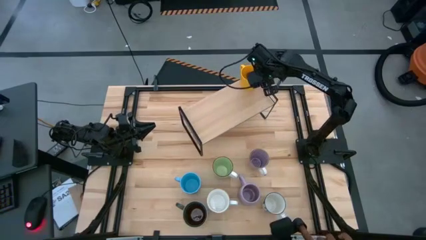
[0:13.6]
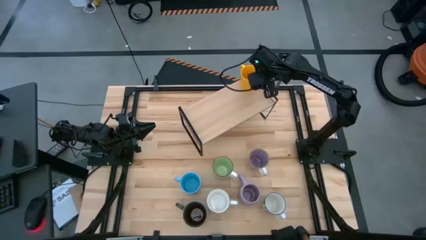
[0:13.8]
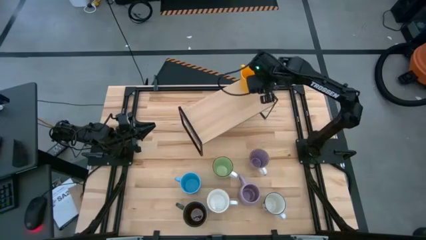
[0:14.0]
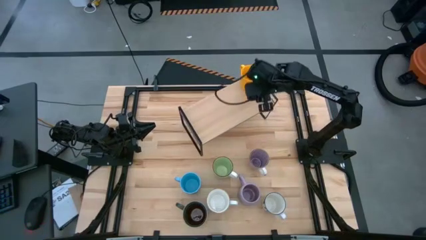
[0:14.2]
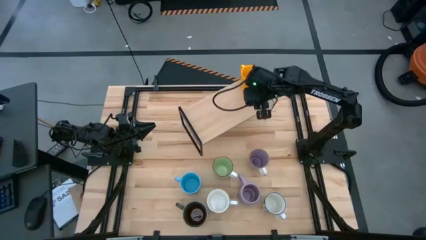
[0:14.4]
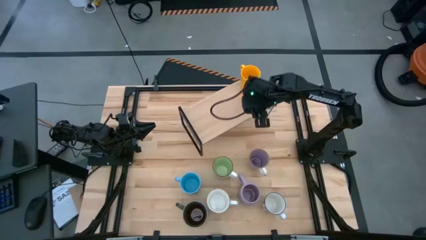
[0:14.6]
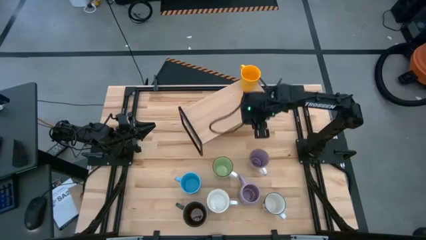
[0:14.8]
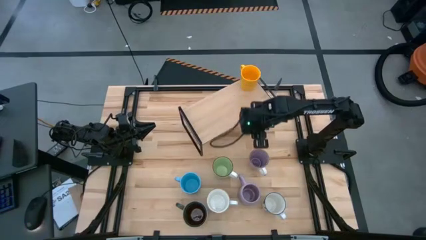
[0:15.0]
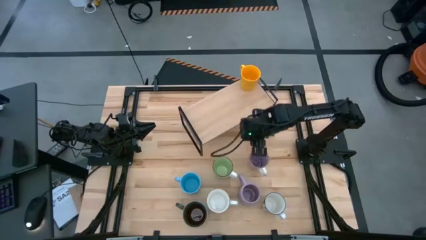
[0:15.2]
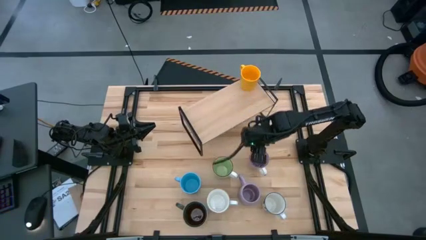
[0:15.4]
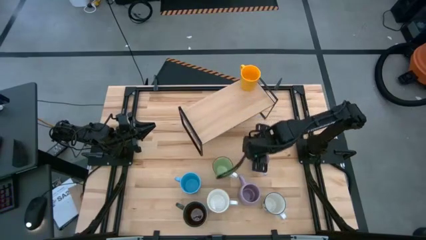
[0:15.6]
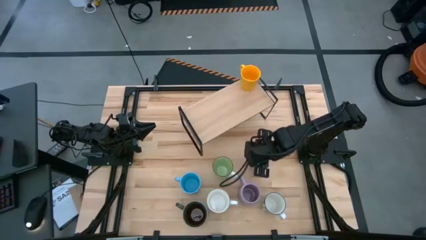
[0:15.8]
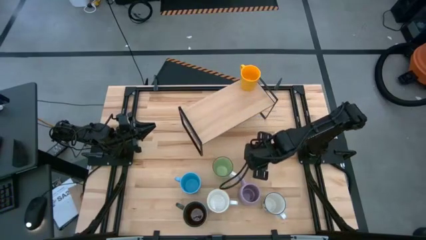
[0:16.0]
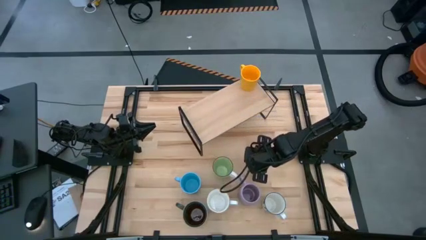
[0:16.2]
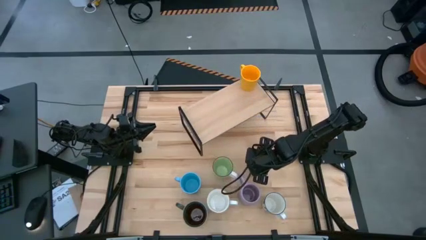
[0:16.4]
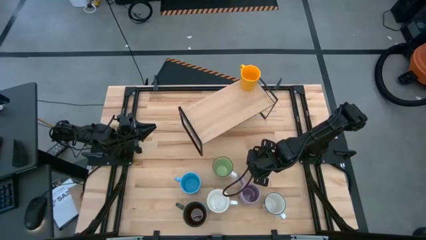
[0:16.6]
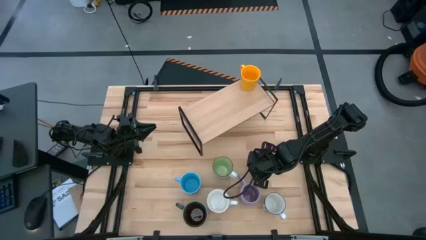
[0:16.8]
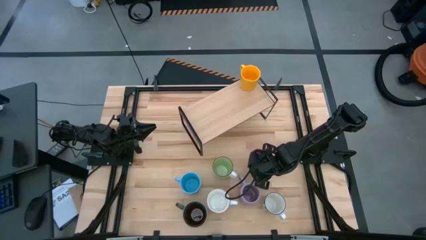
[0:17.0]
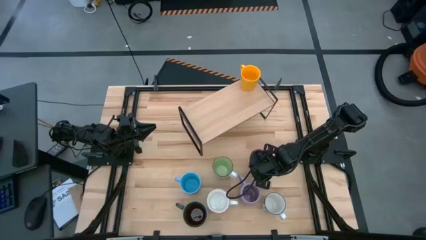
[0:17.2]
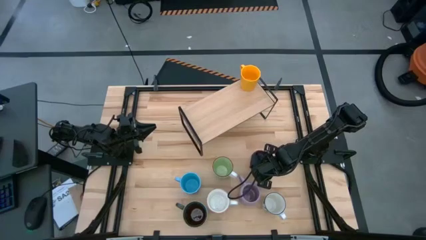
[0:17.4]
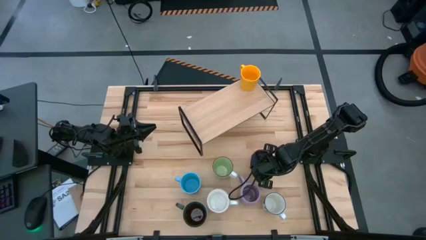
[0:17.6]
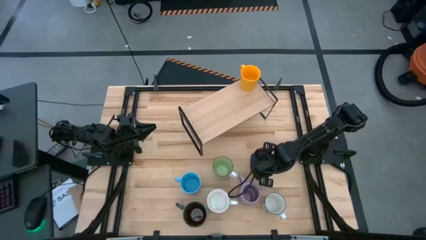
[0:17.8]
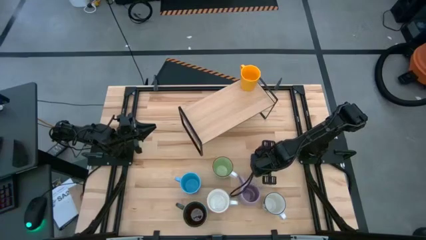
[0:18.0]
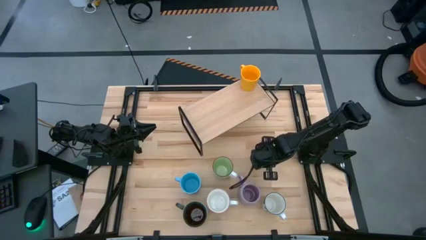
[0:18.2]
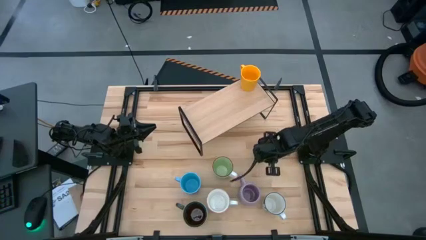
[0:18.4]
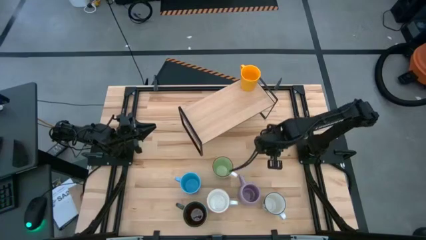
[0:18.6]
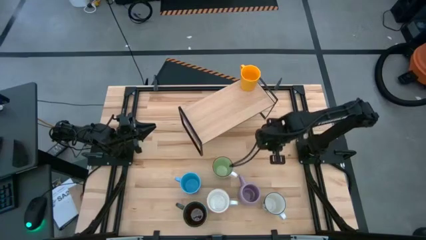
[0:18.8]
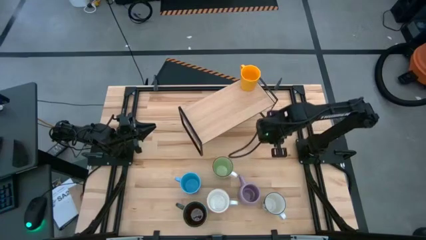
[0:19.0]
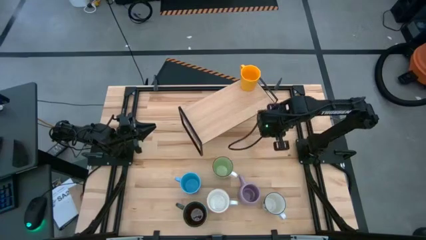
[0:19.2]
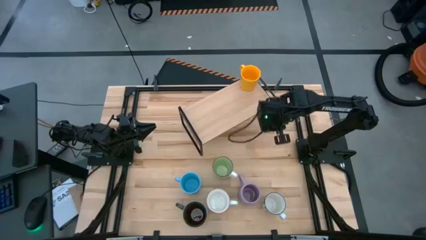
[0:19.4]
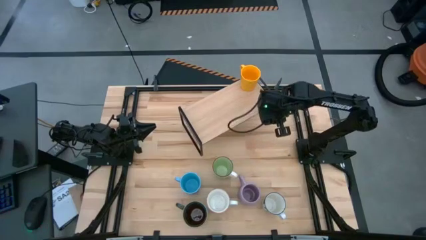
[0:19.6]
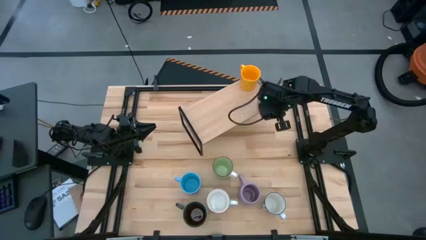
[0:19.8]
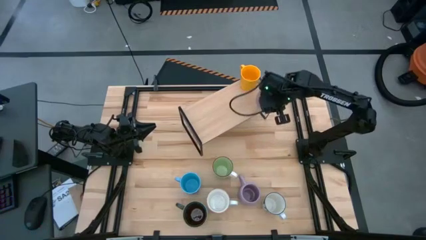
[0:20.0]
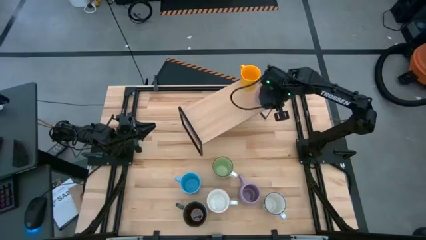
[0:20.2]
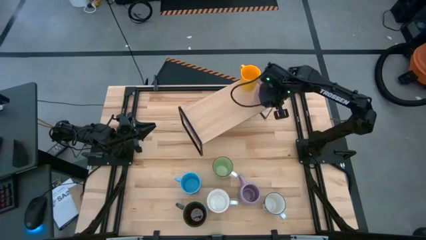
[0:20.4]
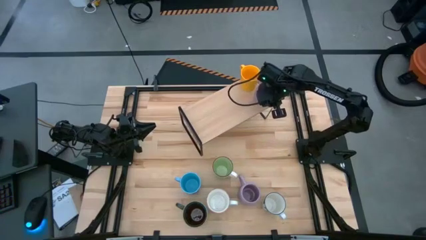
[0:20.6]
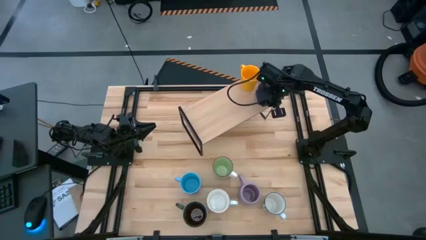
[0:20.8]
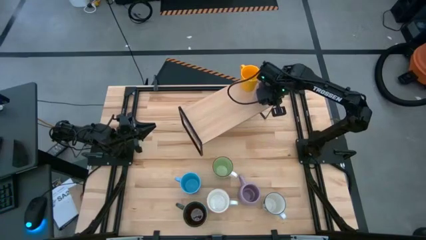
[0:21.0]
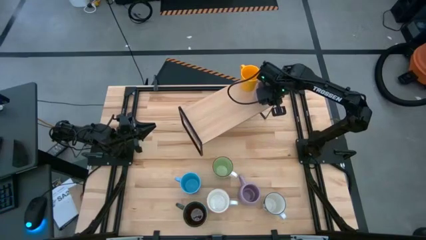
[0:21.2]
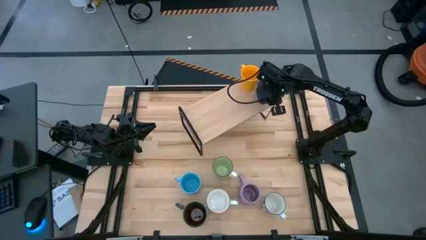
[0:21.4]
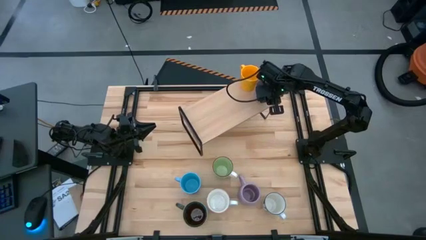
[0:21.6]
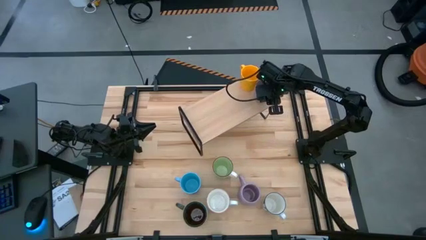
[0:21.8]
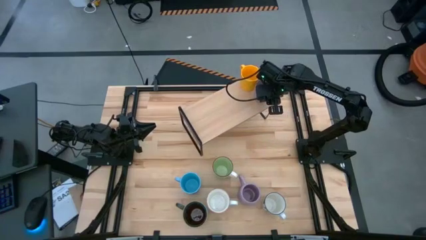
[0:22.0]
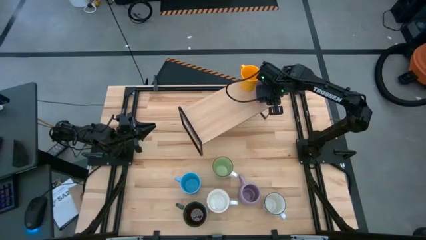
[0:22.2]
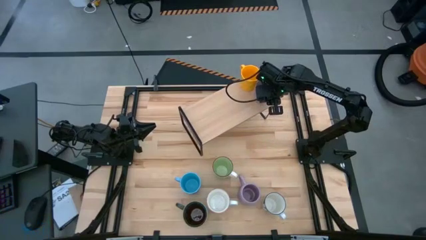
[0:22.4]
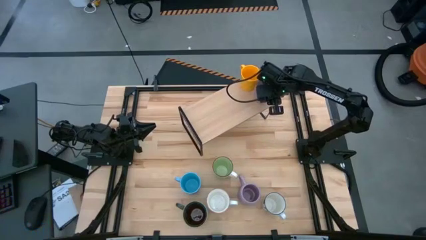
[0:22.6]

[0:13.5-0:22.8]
Task: Place coffee mugs
Put the top purple mug on the shelf

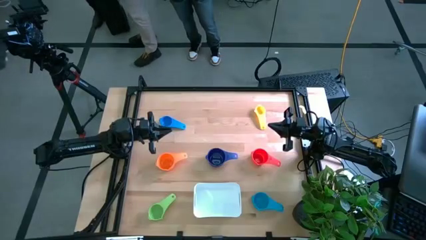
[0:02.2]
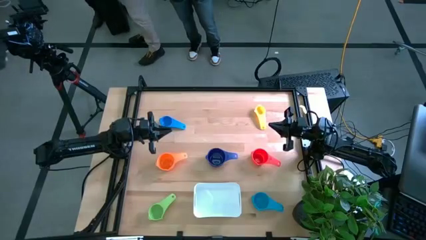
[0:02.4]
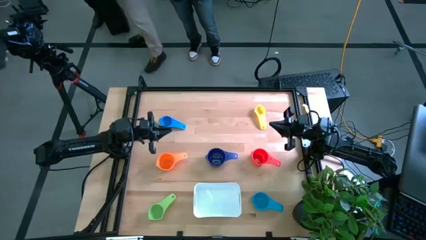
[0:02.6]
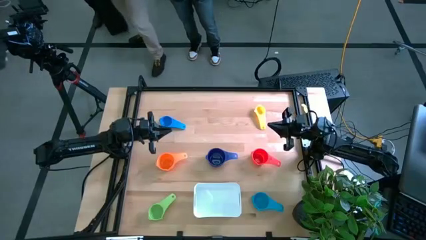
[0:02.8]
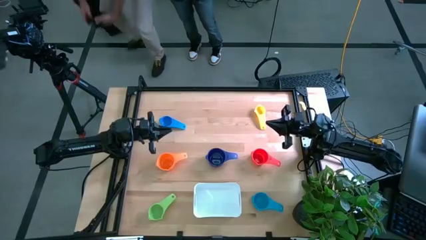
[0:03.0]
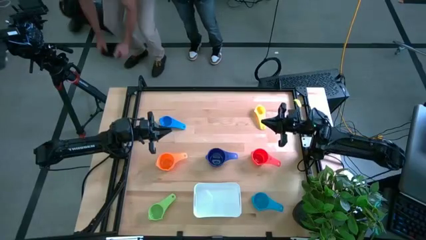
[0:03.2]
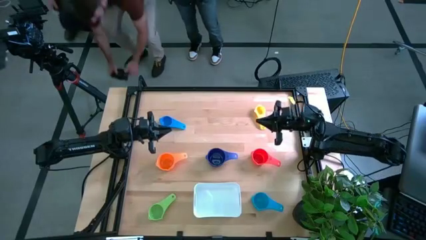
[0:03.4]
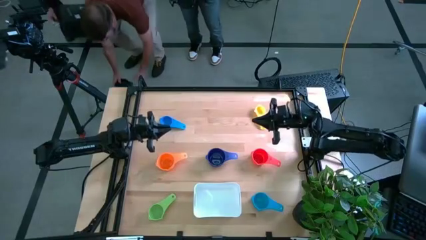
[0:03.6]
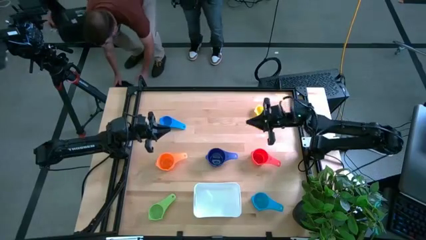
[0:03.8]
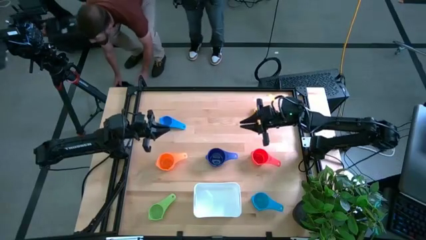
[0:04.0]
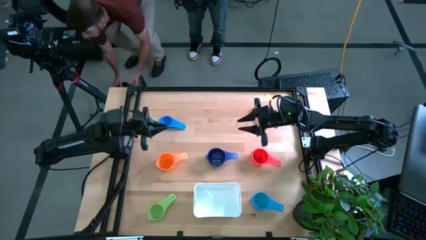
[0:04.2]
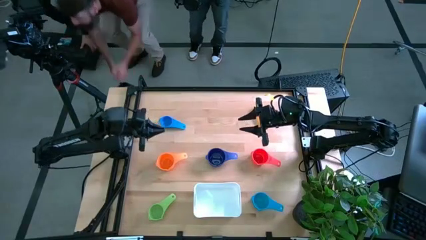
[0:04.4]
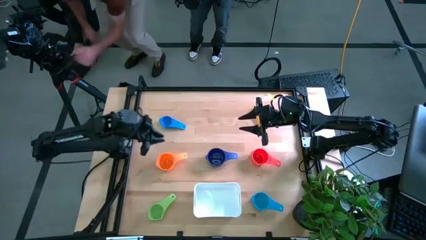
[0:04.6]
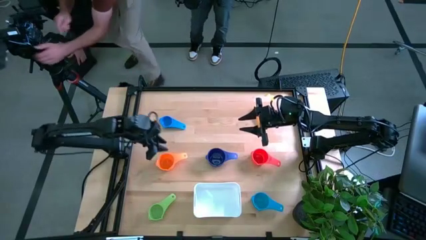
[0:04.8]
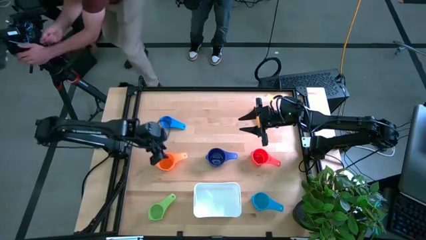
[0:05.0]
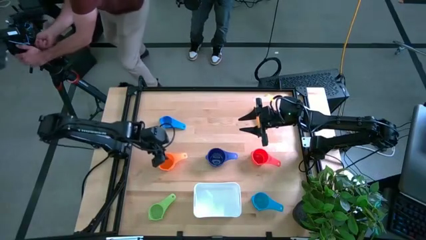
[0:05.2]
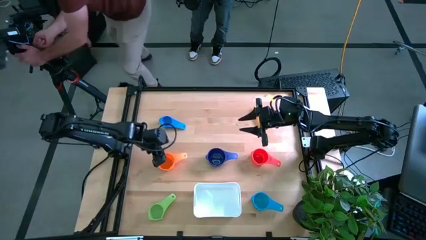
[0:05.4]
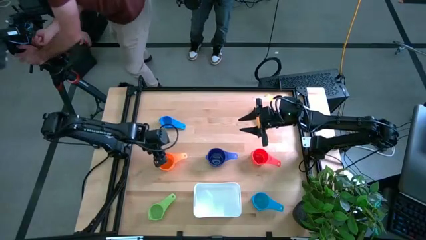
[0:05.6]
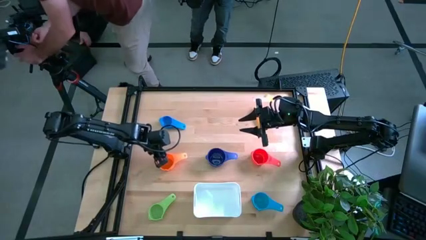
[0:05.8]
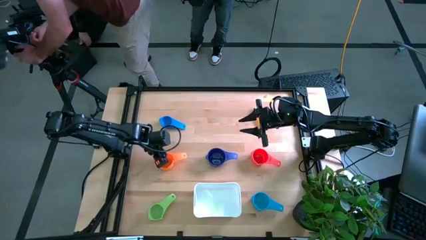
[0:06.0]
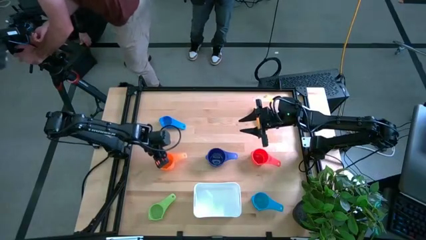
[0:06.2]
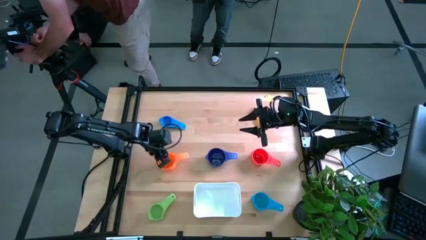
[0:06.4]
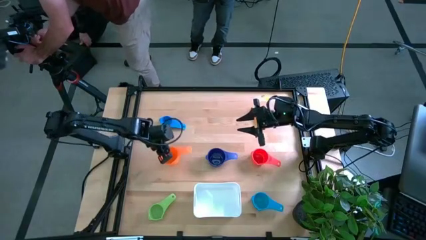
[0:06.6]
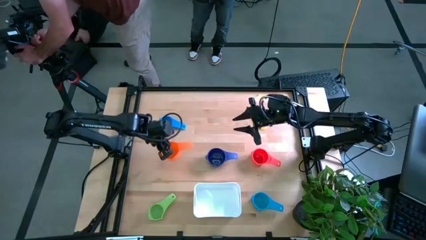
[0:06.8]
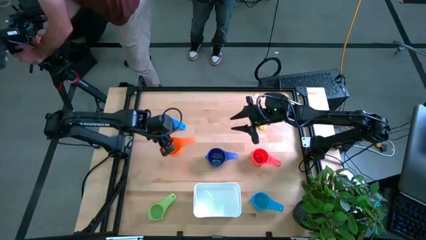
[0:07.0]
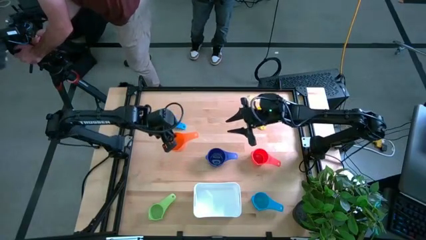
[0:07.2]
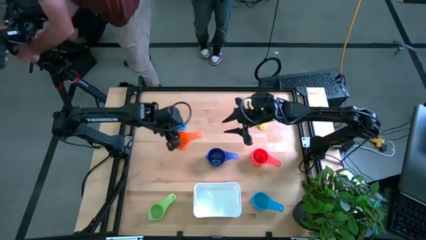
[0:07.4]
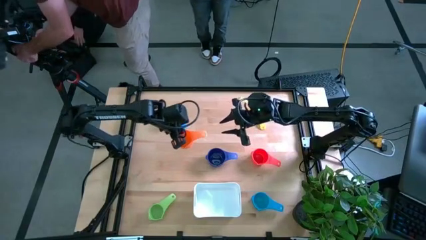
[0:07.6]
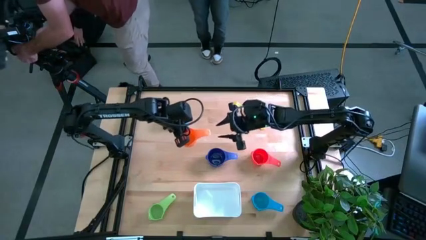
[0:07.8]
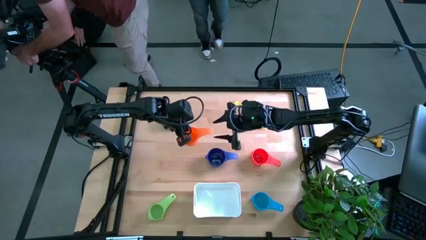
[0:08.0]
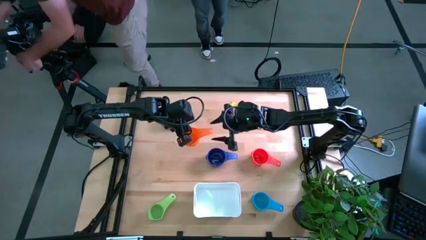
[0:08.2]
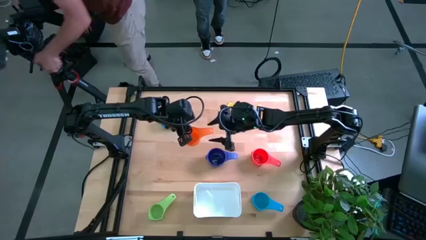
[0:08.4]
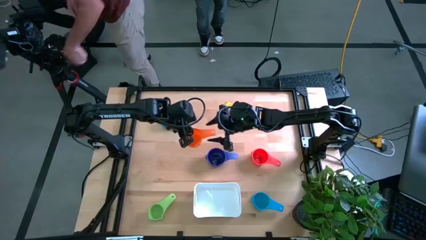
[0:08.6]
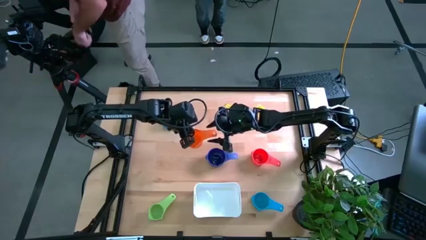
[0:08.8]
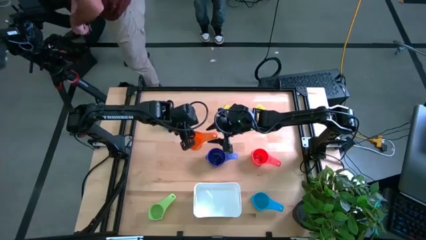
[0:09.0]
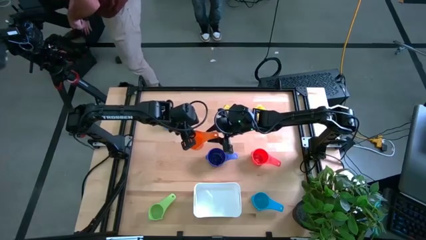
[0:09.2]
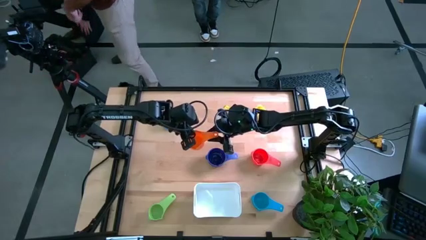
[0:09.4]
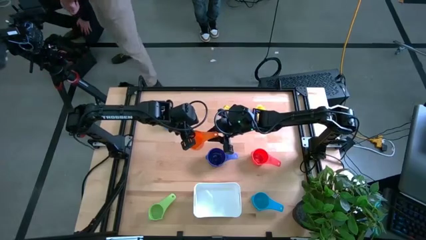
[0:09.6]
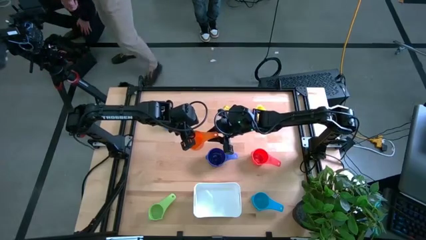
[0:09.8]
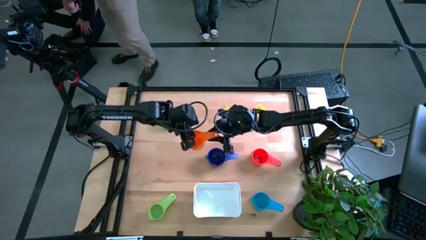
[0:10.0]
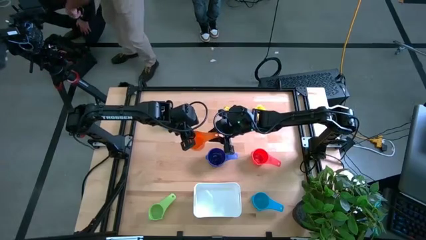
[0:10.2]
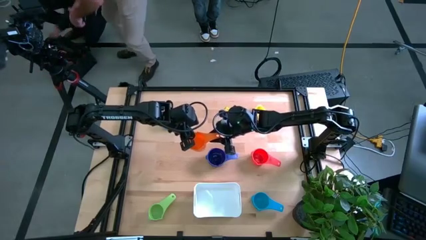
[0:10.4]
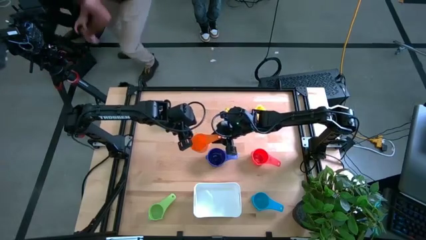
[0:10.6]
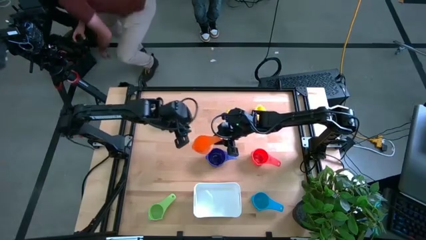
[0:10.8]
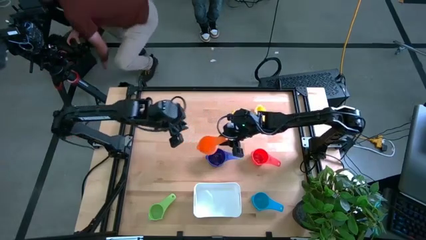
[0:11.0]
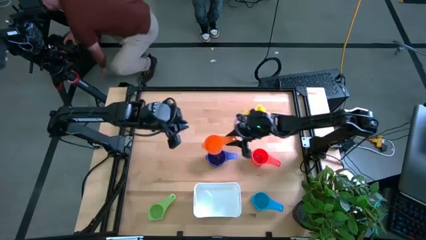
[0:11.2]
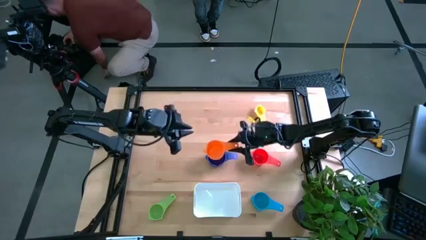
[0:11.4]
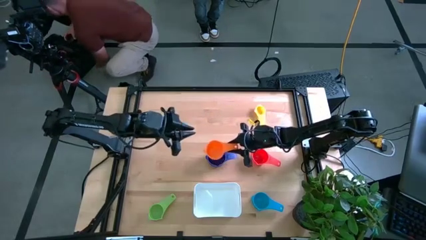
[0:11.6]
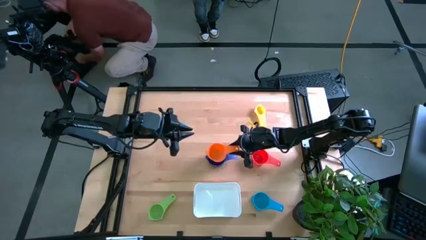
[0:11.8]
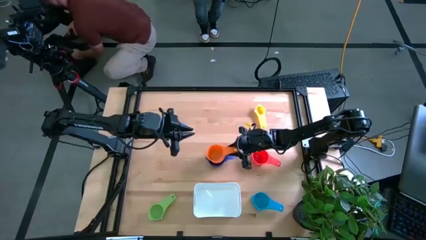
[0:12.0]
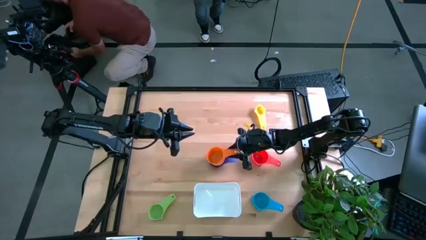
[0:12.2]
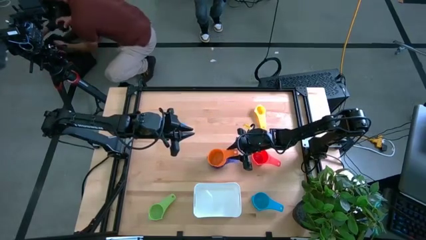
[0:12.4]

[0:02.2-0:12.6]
Task: Nest measuring cups in basket
Stack the orange measuring cup on top of the dark blue measuring cup
